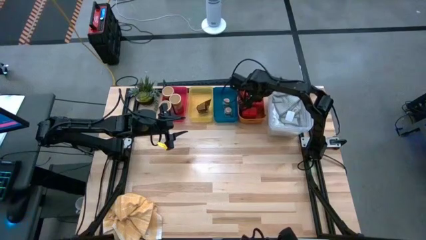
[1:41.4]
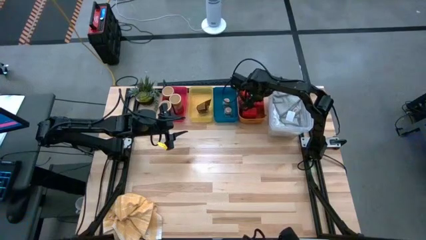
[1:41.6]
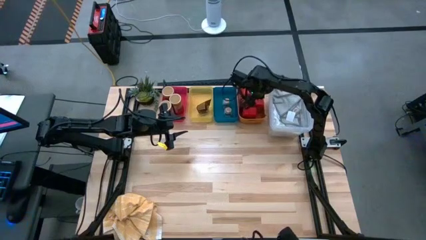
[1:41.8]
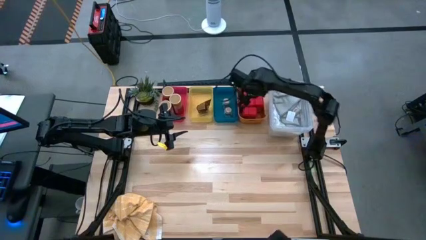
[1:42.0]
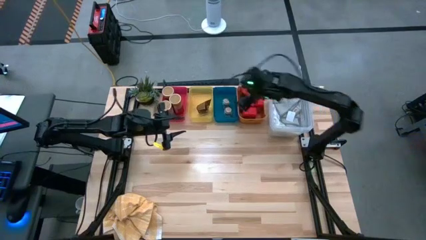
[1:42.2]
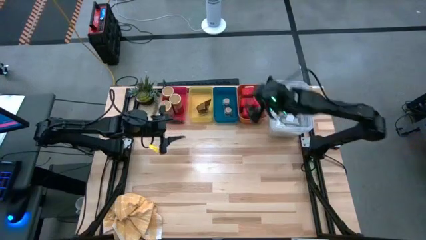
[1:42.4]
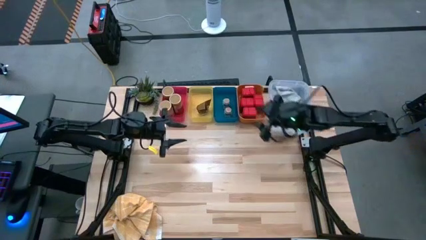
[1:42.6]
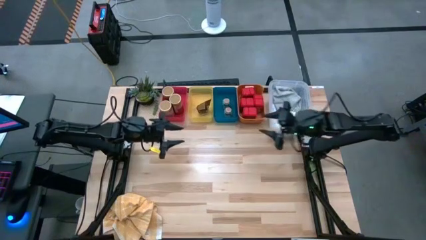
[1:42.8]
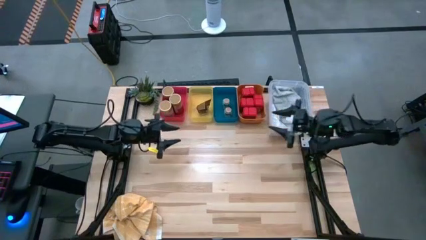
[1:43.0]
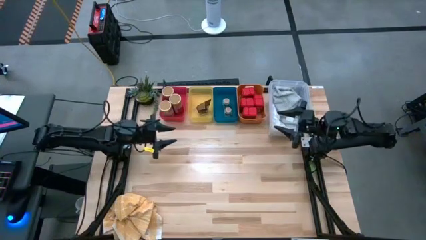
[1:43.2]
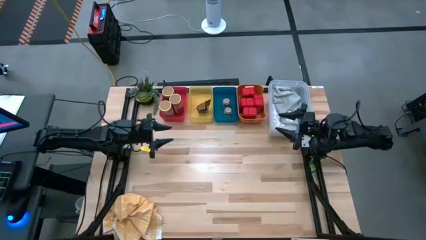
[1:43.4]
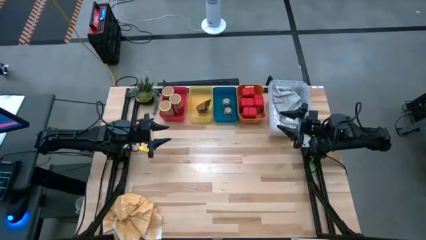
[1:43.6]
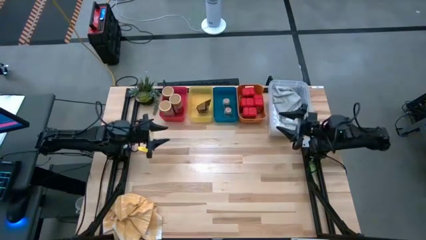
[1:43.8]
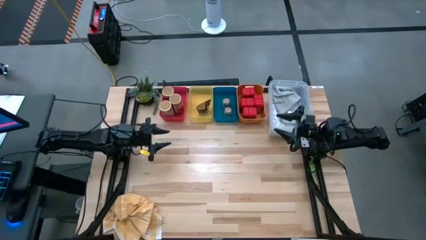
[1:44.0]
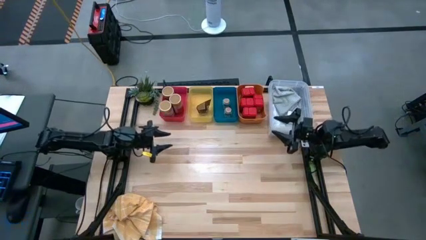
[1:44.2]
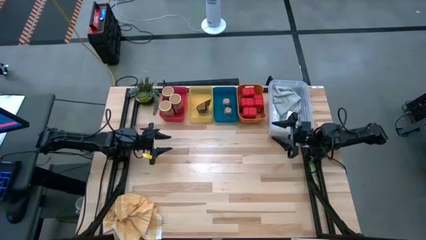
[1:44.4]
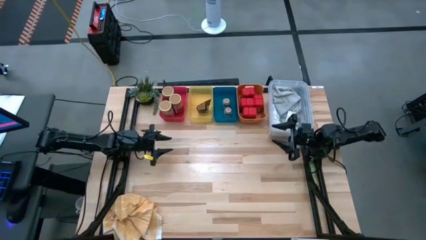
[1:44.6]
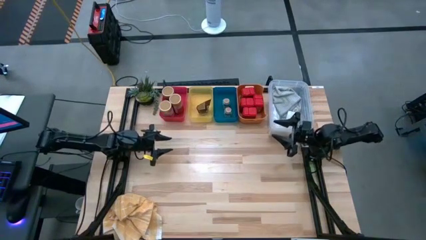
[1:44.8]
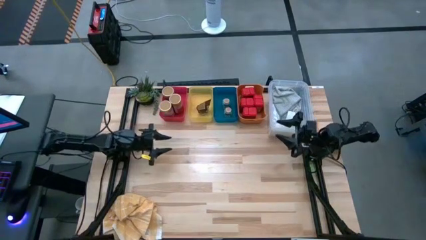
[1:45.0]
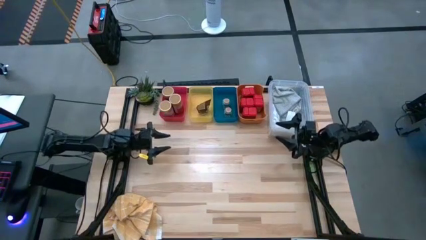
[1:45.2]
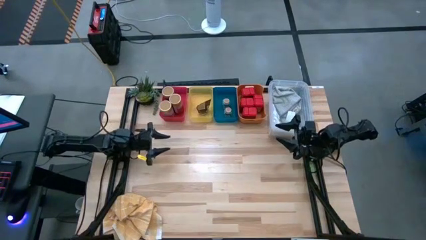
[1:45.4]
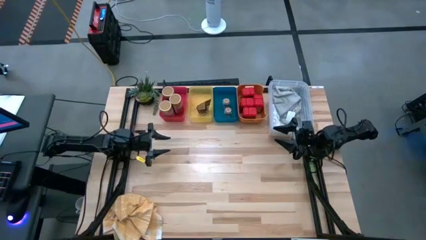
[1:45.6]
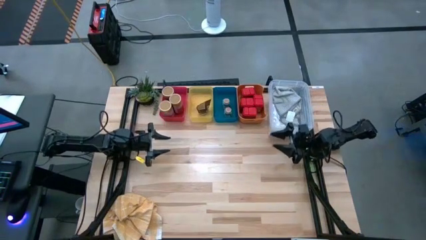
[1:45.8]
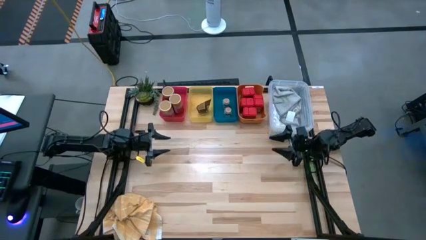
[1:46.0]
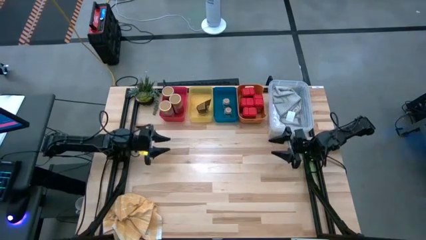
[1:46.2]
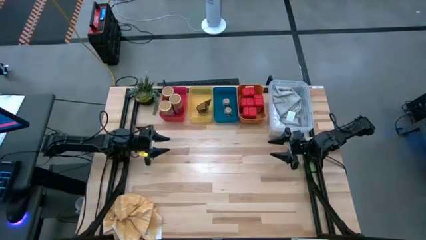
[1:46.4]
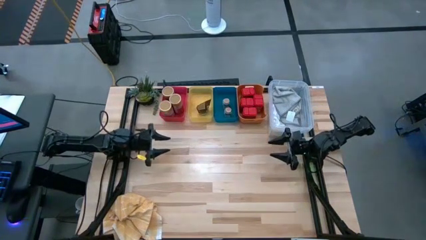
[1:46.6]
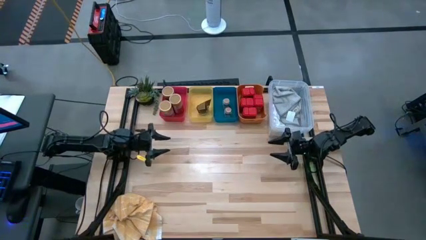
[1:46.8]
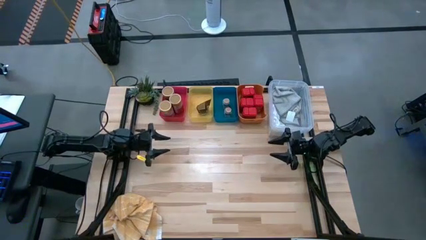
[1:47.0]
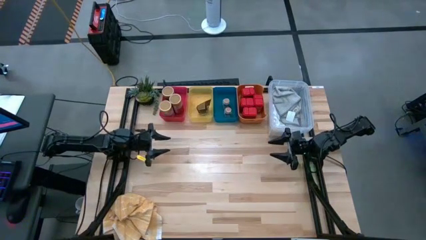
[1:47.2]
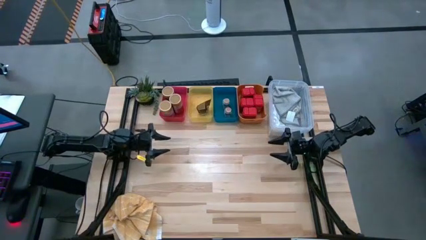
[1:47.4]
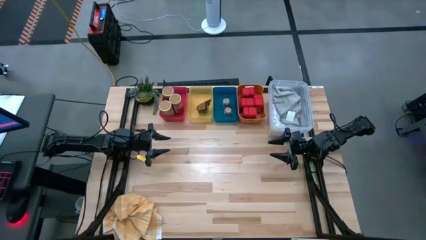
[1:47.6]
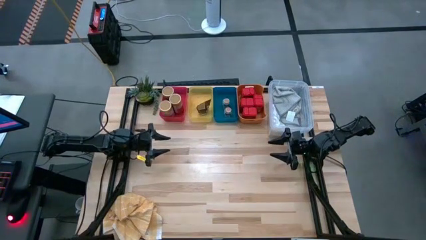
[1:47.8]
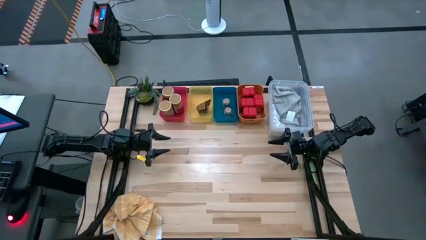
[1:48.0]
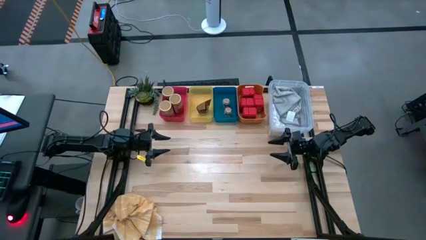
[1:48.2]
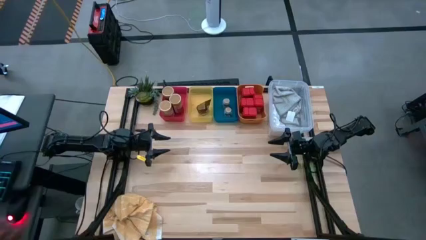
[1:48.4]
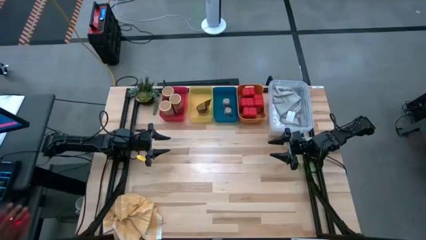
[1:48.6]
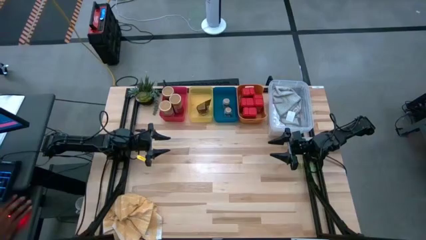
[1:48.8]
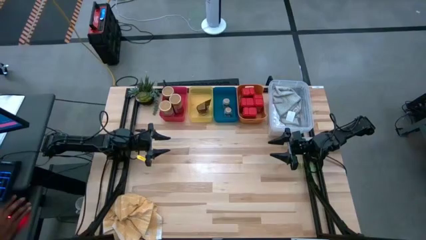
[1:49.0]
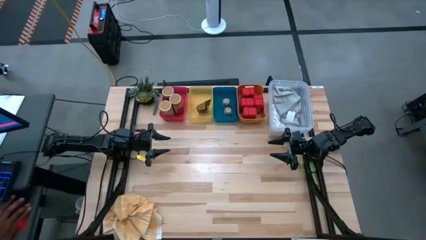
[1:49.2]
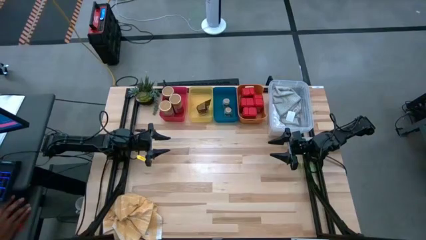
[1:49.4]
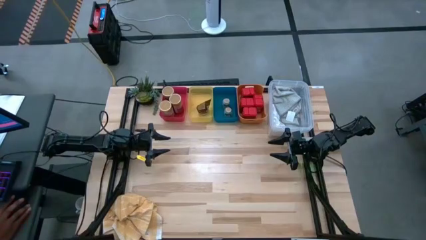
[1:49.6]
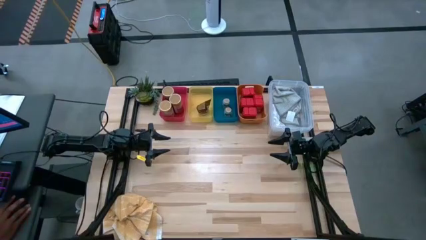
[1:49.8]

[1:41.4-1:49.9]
Task: Sort spices by type
Return to Home Position
